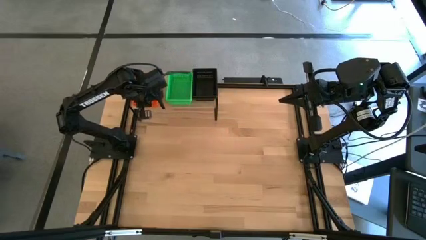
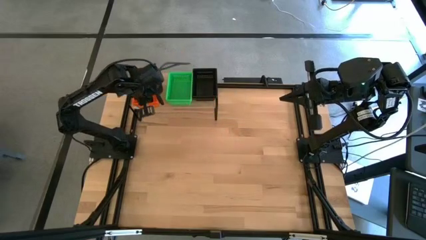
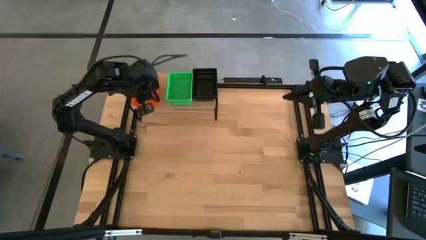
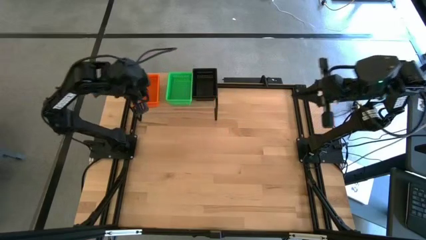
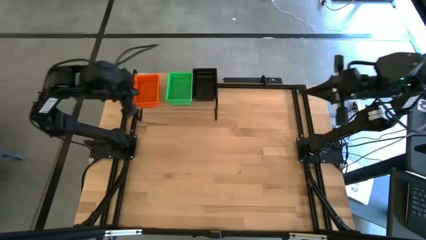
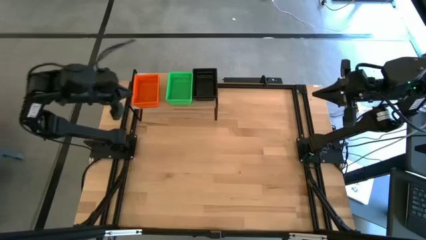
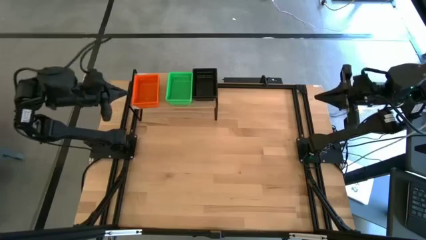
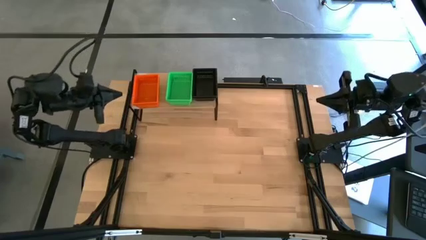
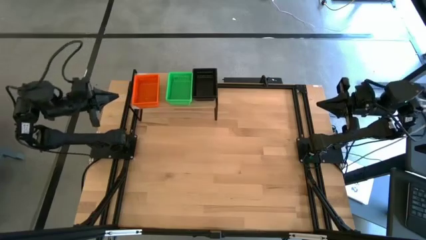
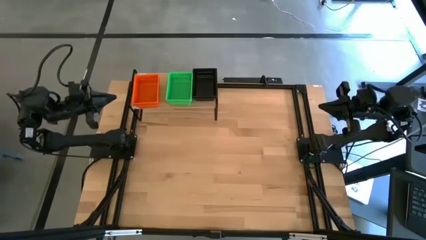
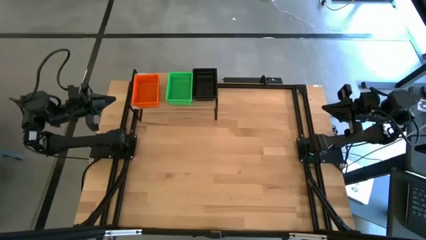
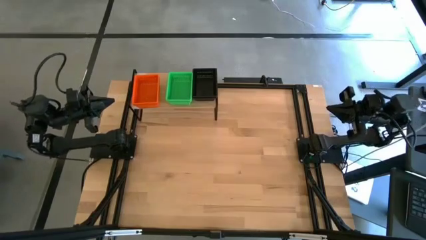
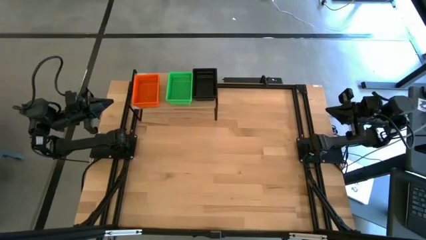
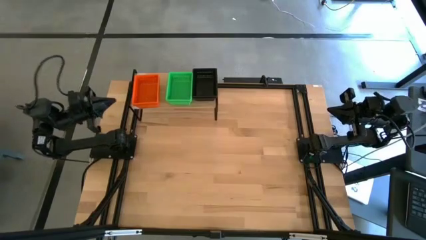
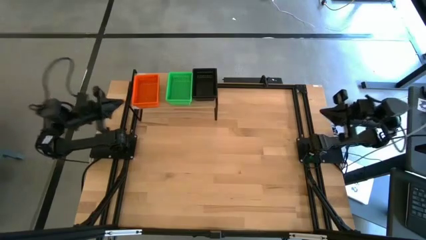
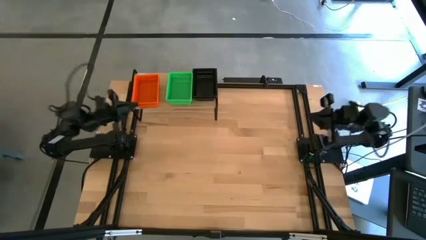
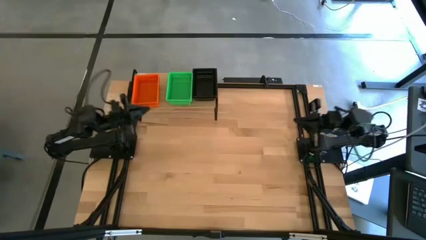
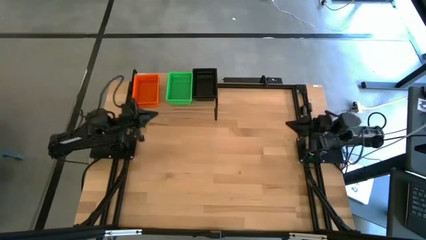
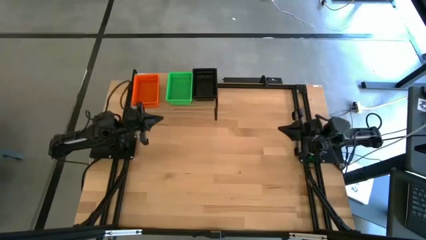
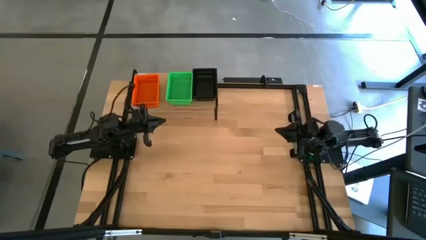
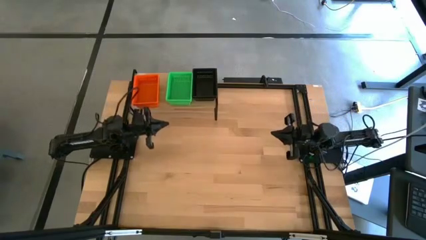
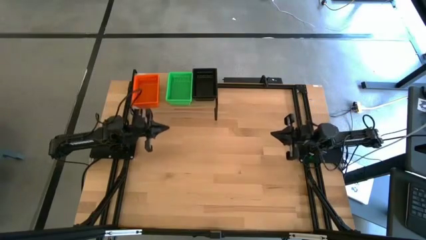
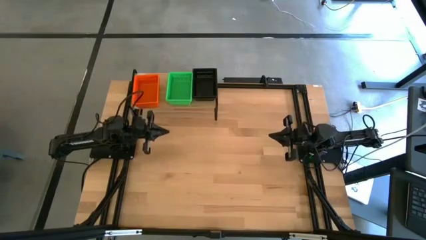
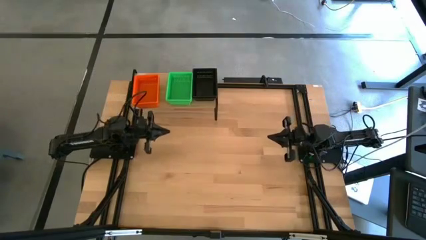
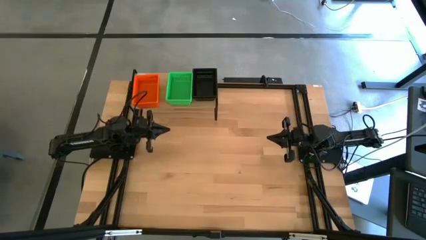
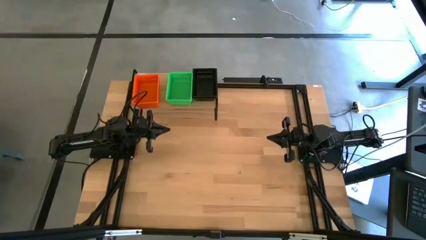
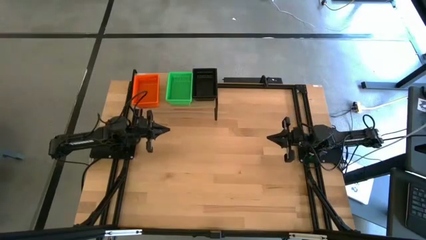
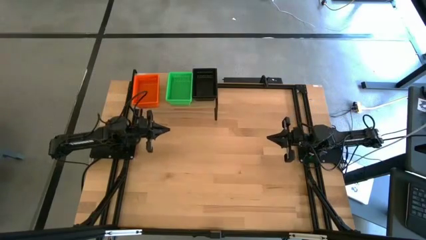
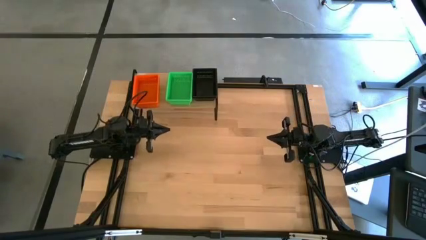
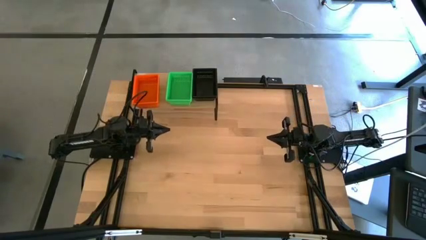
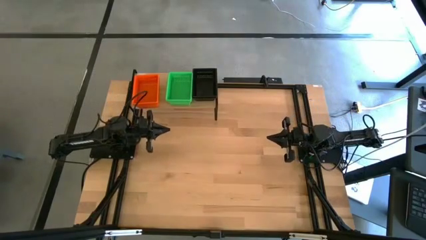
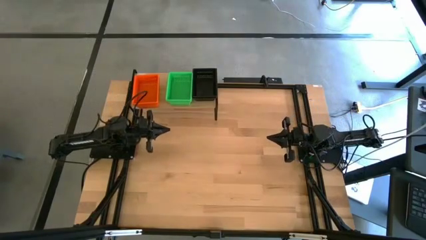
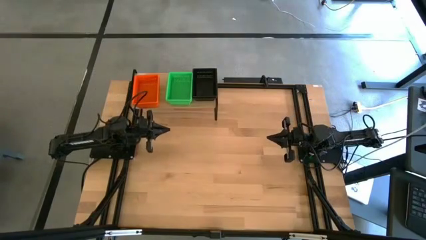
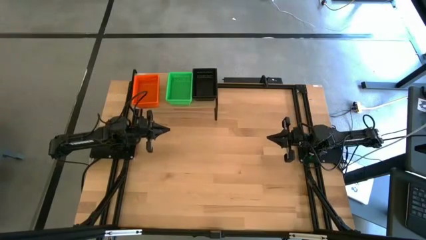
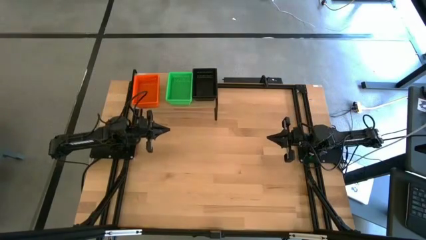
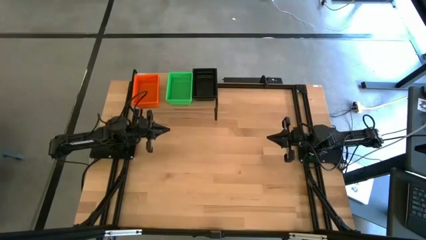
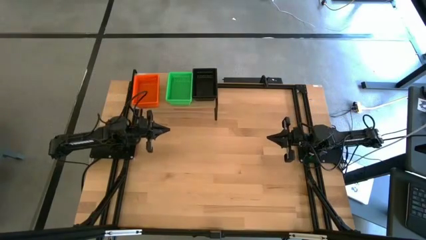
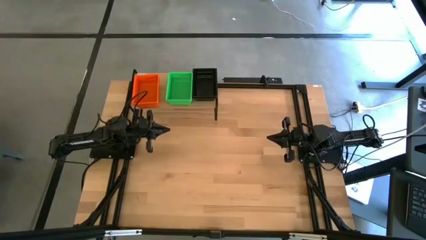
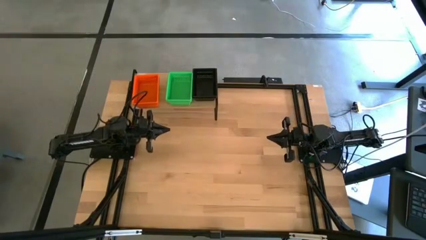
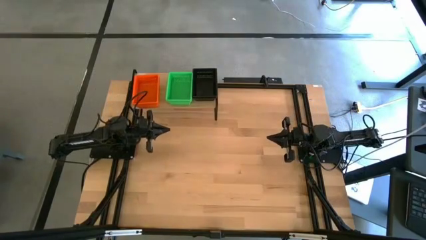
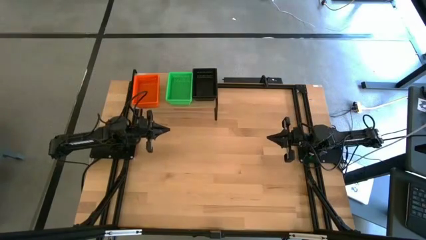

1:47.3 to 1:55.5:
Task: Stack baskets on shelf by color
Return to Home Position

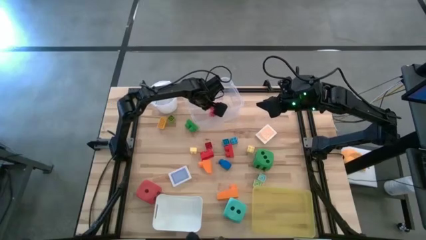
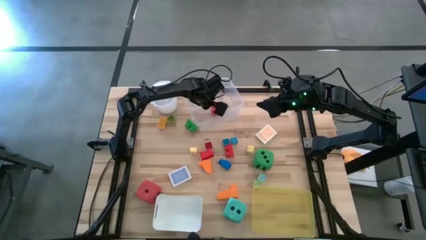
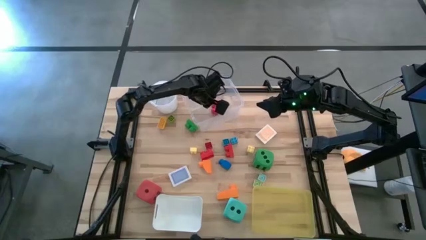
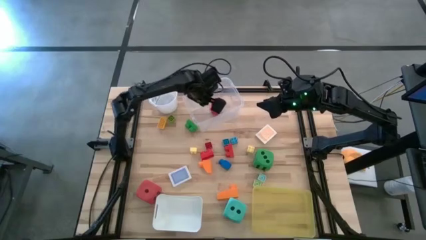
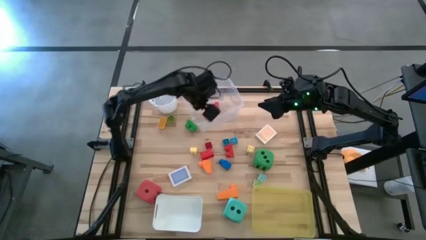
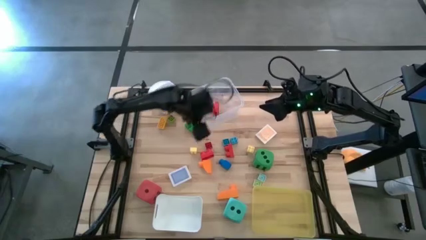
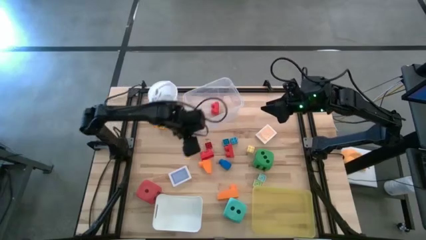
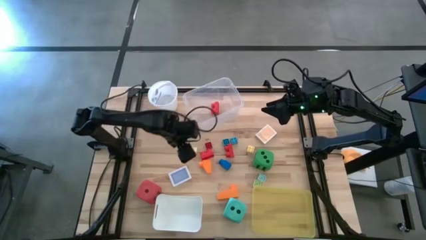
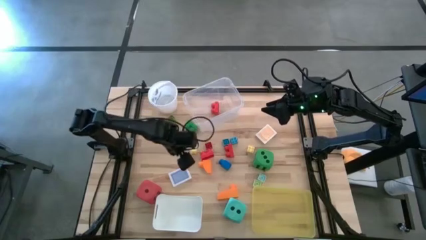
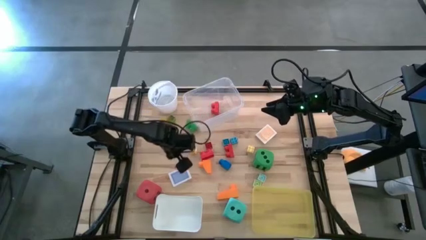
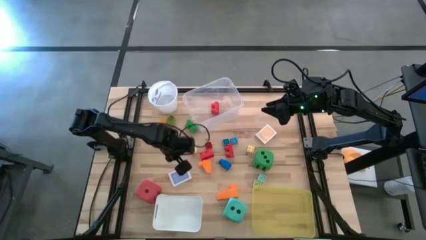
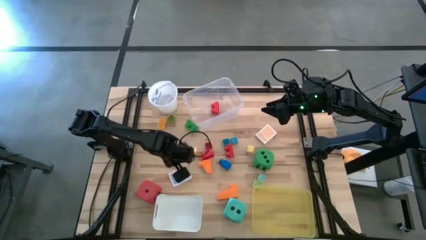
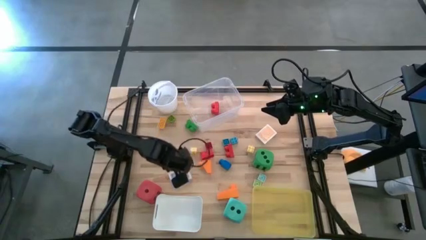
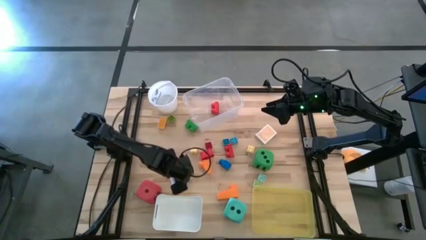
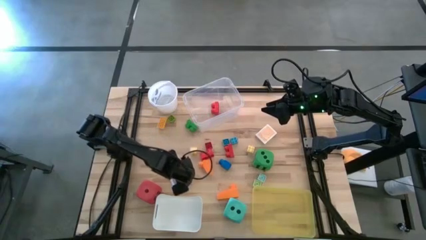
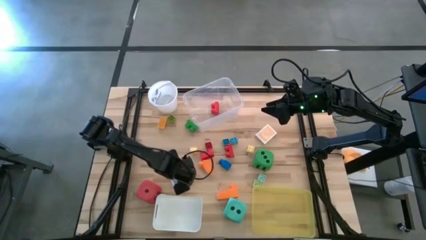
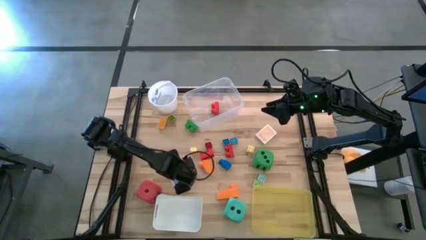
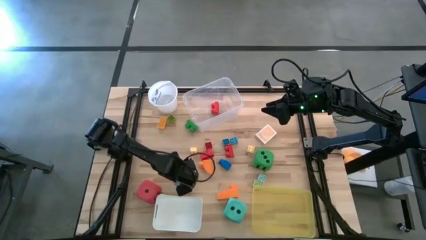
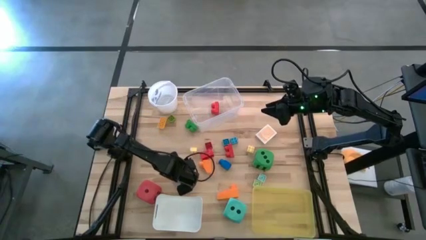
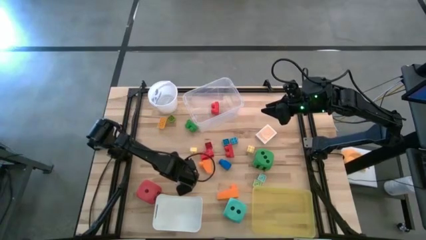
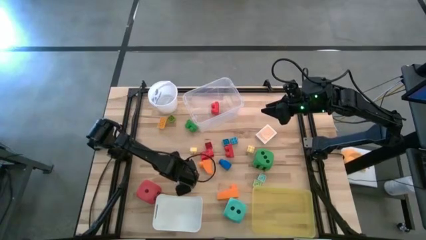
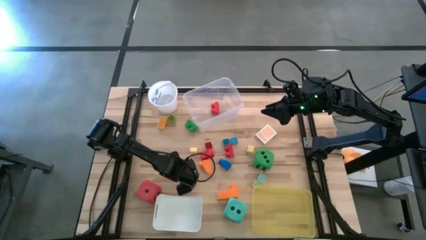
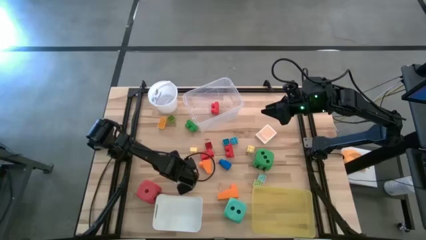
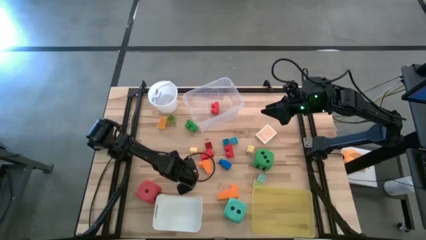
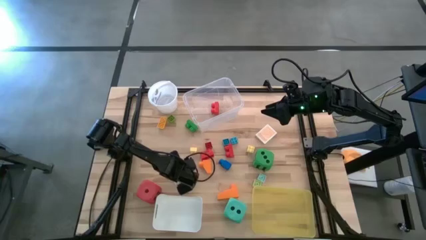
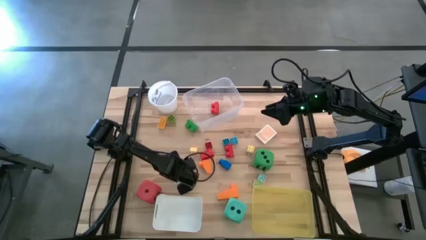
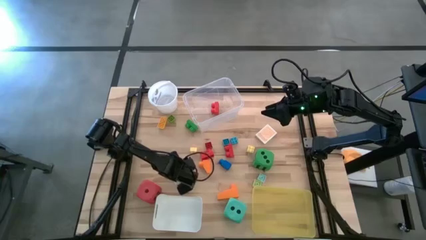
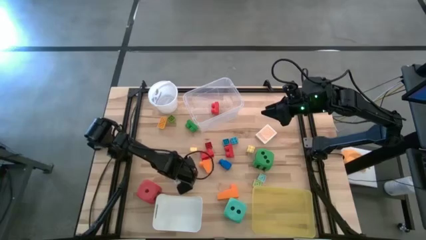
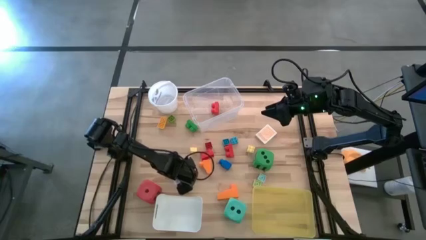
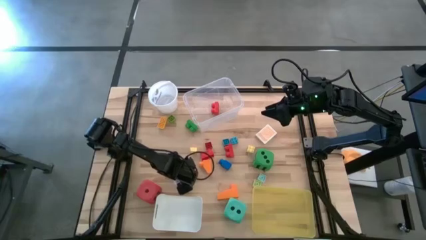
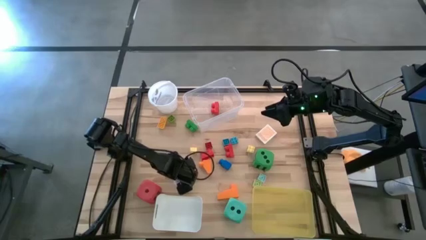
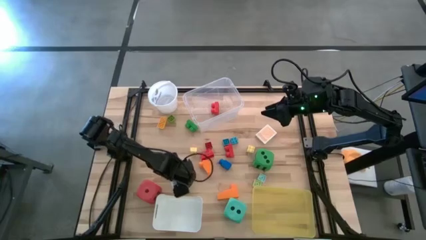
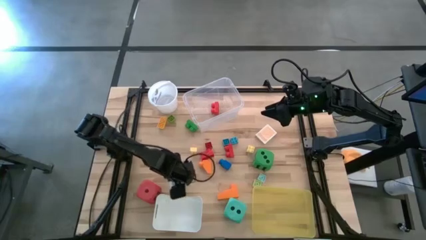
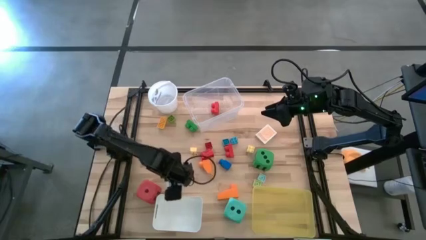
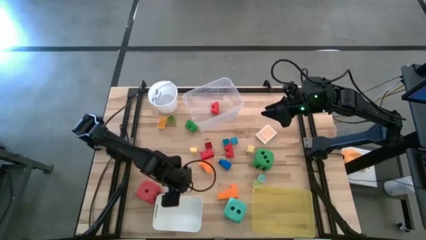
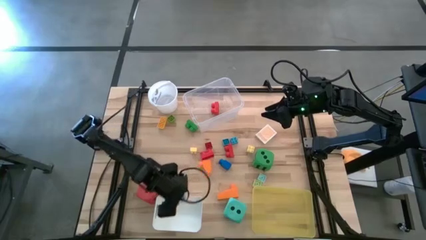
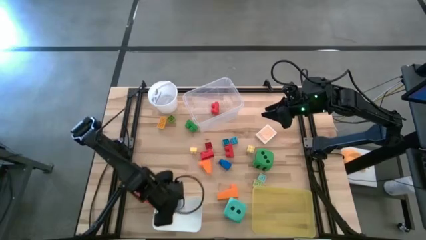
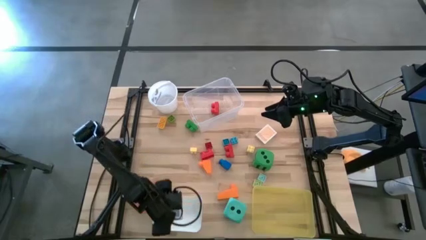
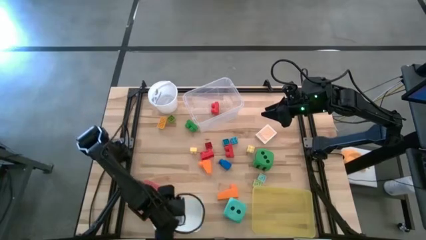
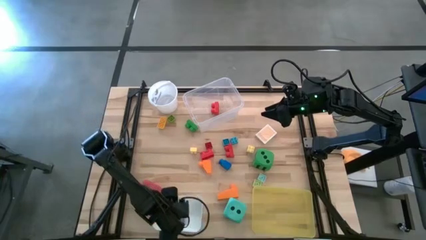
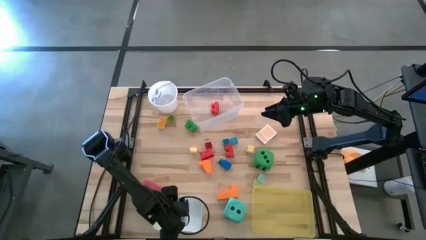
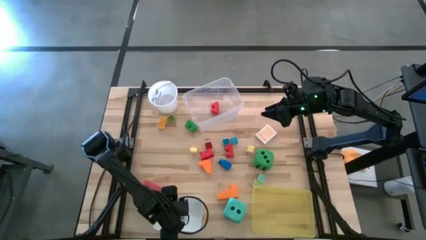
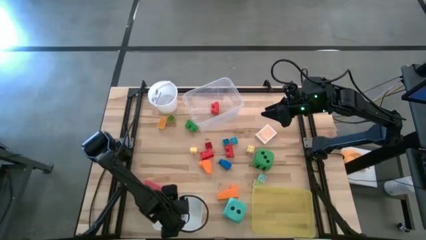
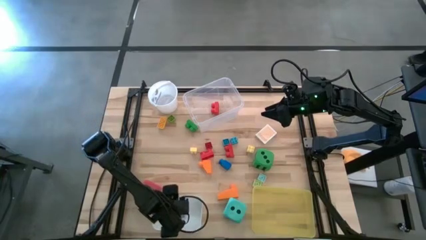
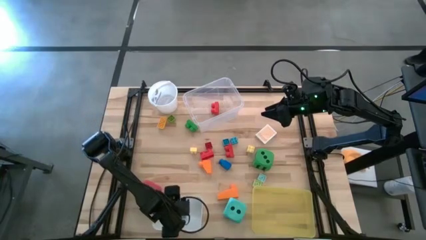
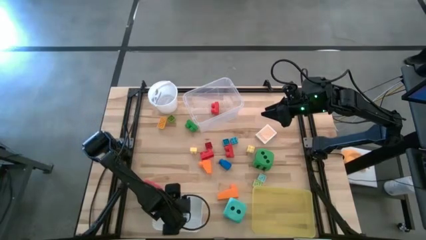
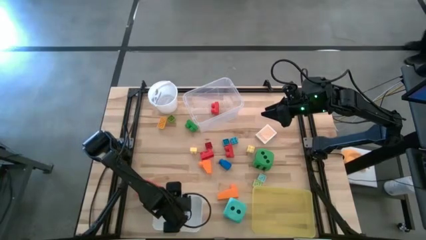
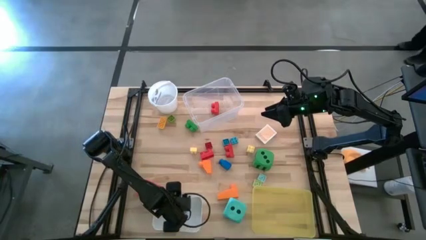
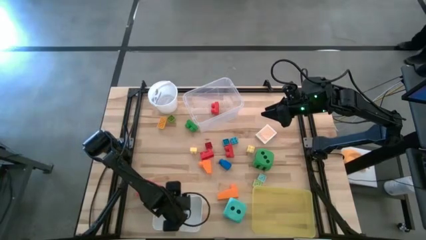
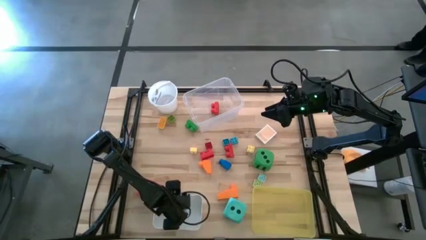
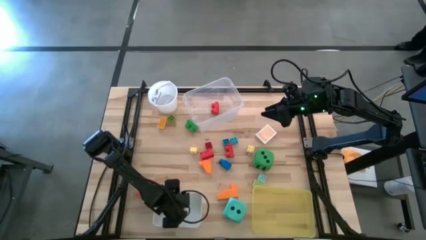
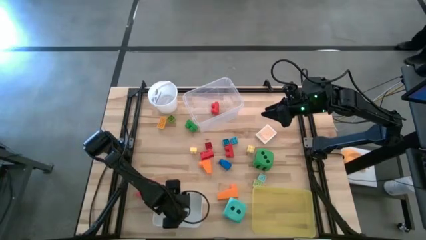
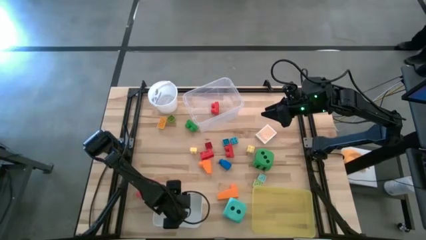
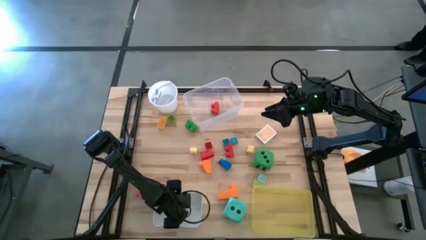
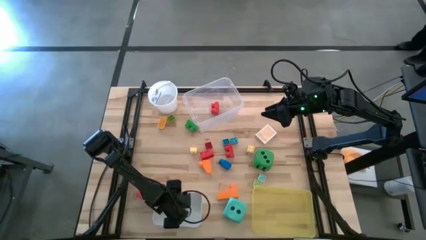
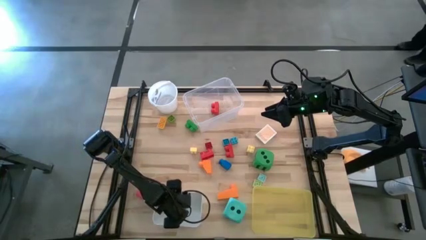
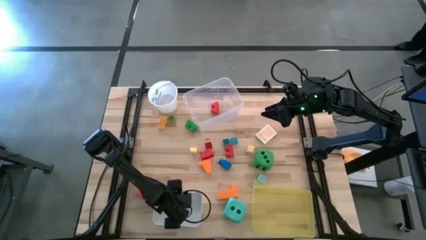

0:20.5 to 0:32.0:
Task: Pick & Place Toys
Put the blue deck of cards into the white bin
